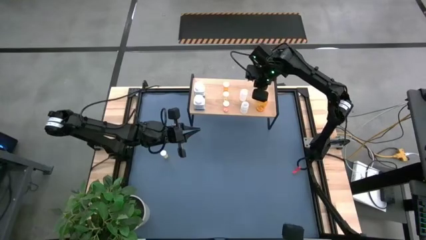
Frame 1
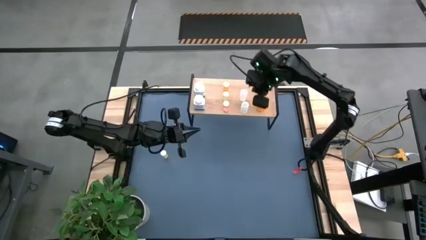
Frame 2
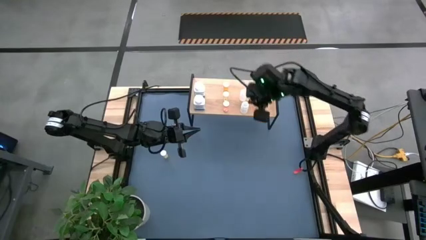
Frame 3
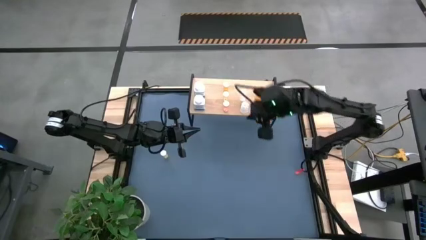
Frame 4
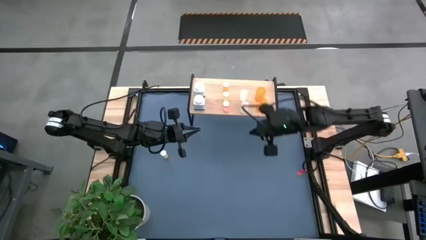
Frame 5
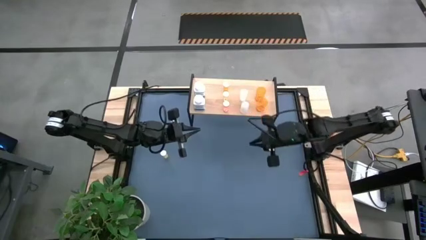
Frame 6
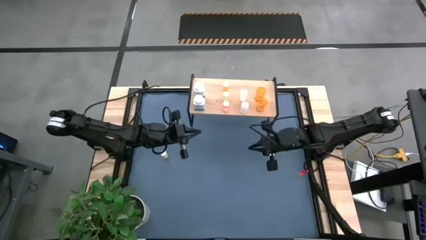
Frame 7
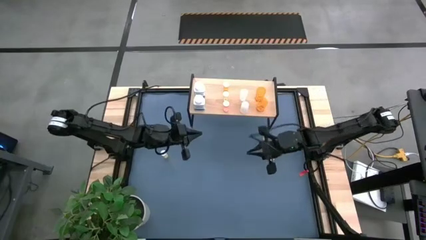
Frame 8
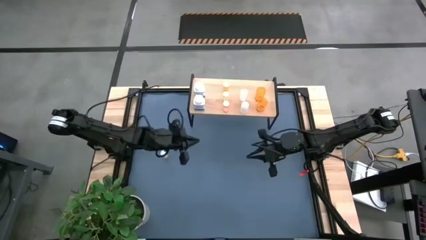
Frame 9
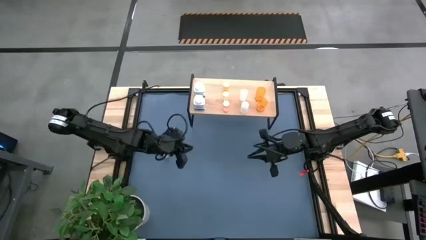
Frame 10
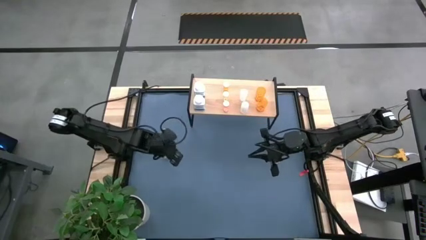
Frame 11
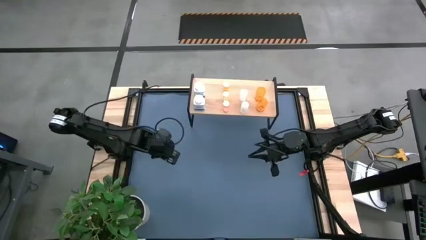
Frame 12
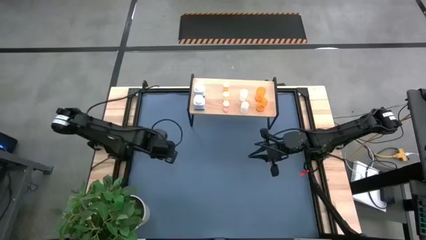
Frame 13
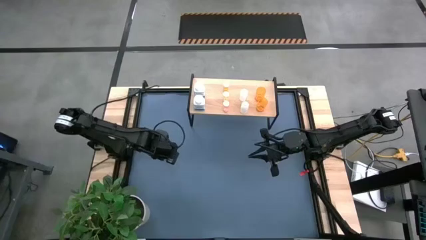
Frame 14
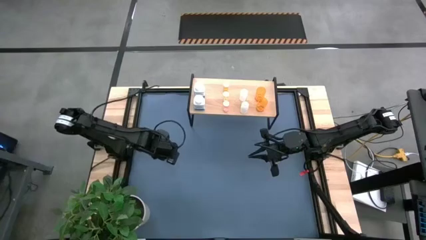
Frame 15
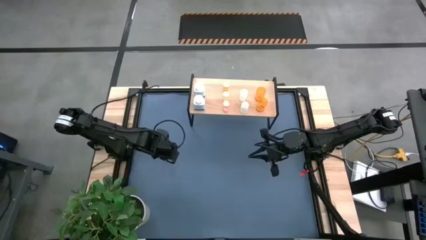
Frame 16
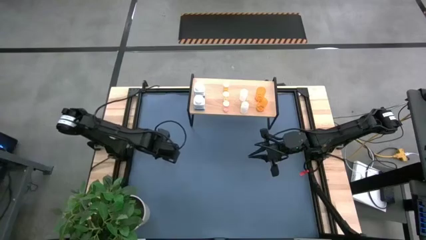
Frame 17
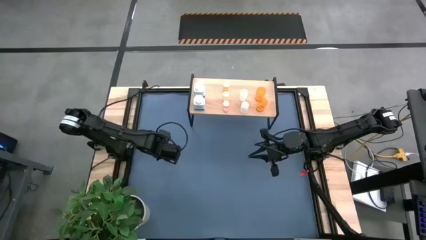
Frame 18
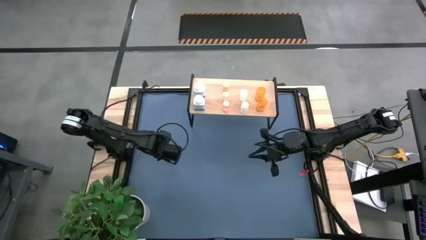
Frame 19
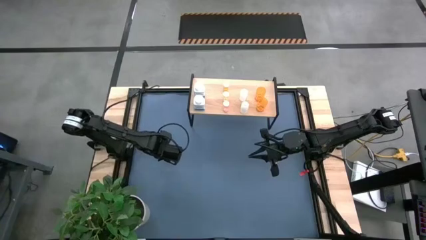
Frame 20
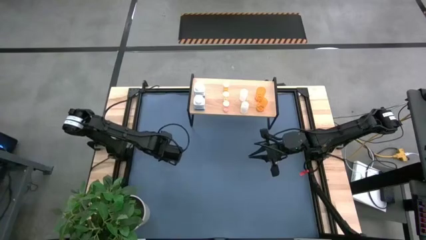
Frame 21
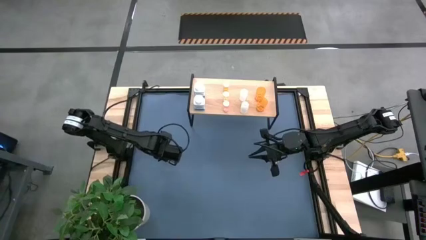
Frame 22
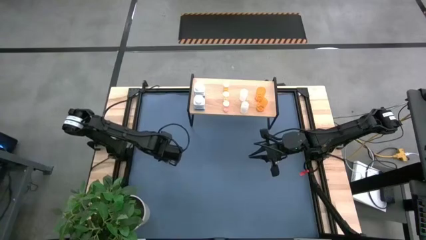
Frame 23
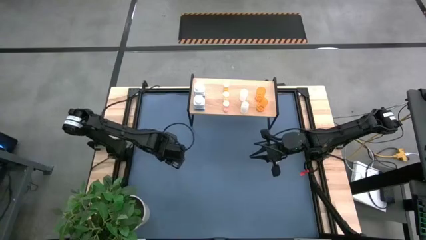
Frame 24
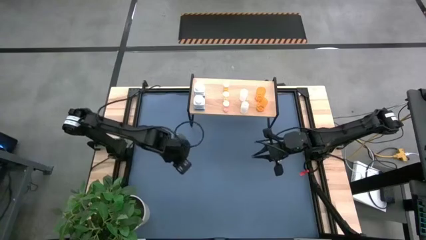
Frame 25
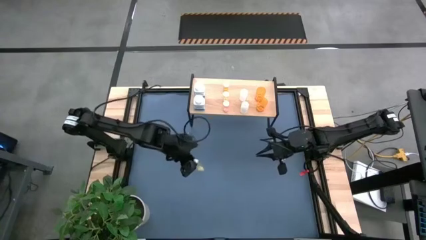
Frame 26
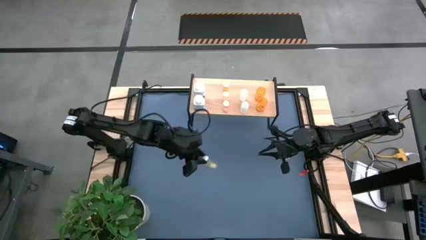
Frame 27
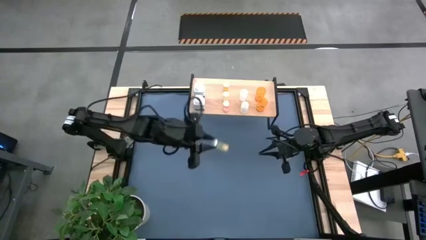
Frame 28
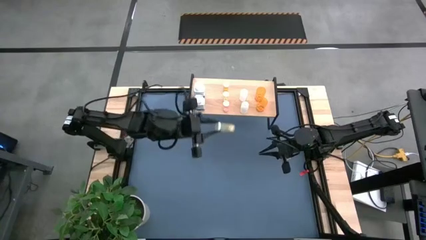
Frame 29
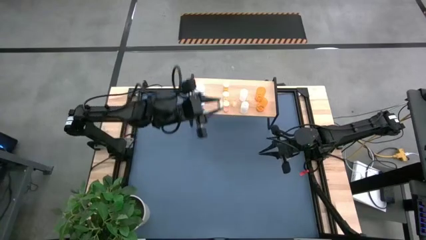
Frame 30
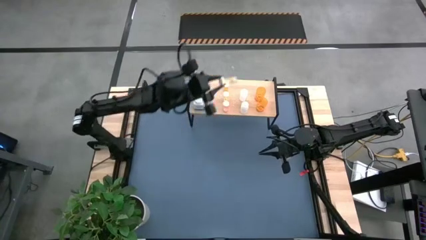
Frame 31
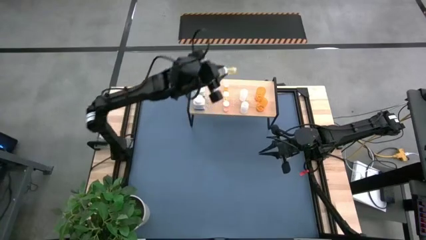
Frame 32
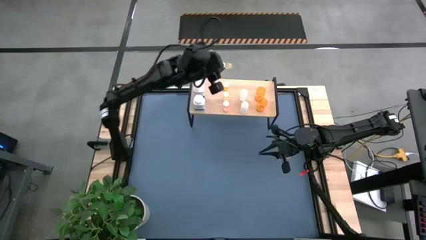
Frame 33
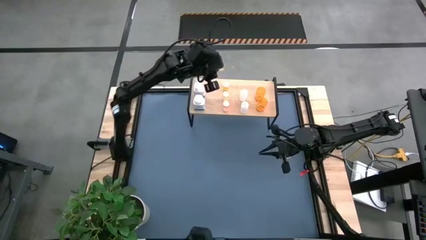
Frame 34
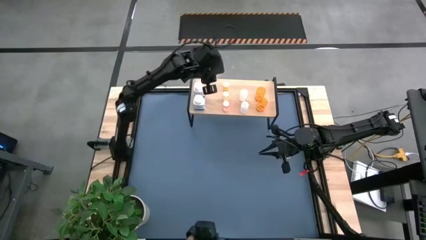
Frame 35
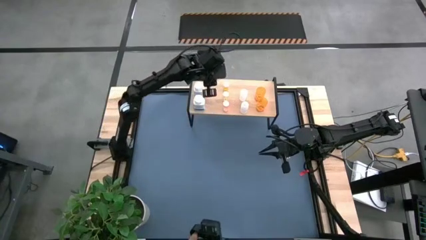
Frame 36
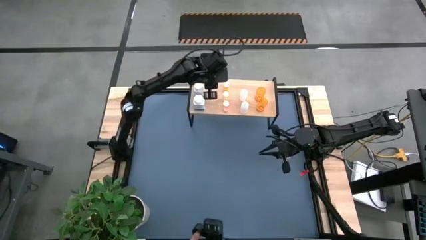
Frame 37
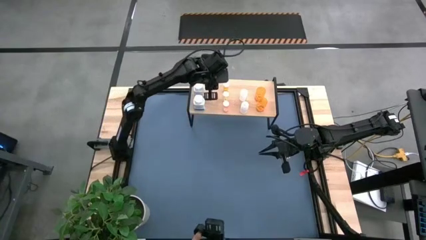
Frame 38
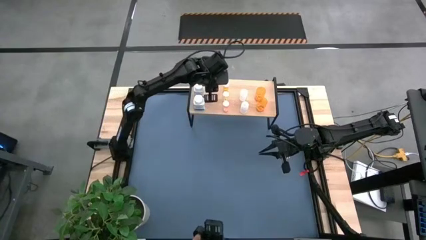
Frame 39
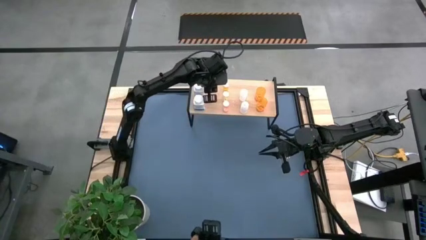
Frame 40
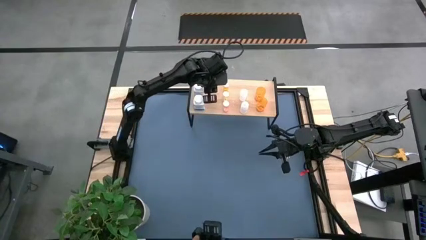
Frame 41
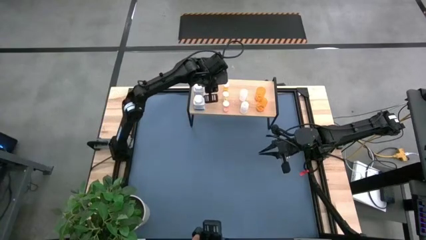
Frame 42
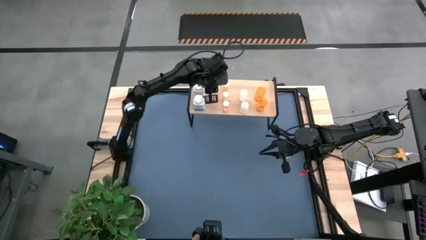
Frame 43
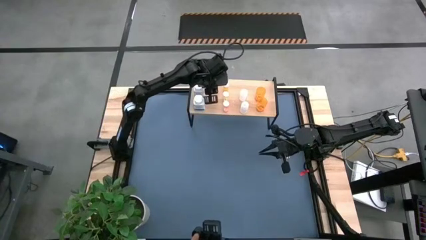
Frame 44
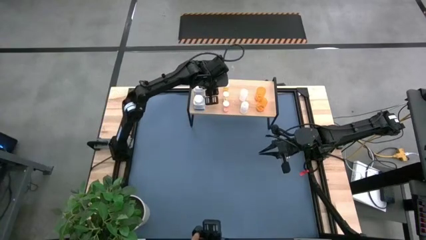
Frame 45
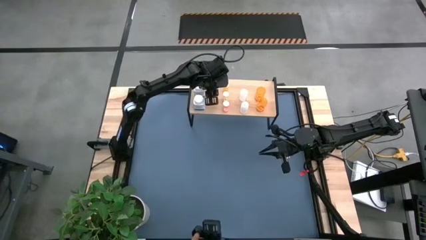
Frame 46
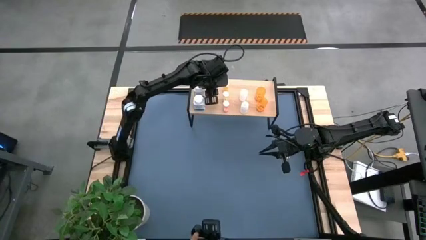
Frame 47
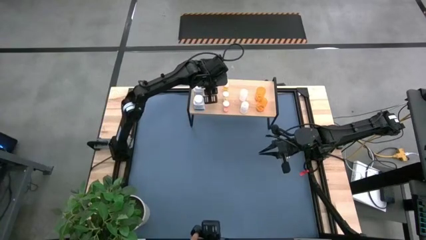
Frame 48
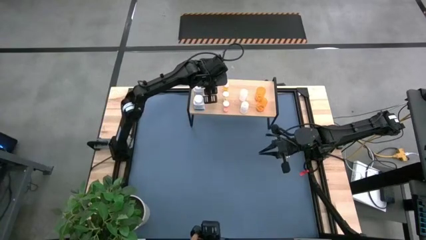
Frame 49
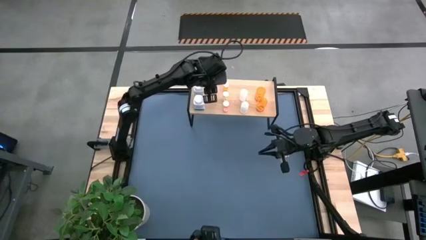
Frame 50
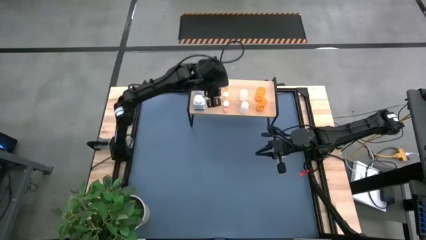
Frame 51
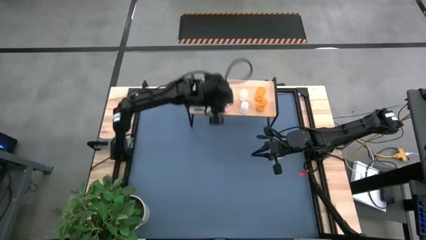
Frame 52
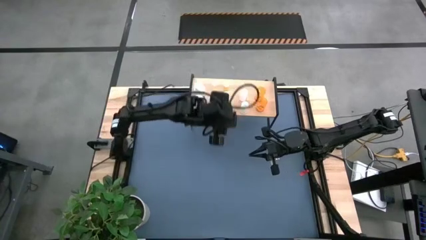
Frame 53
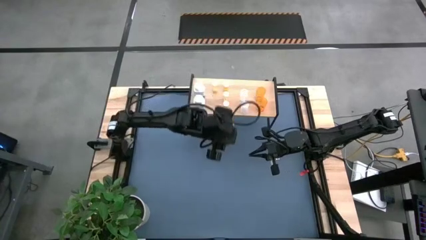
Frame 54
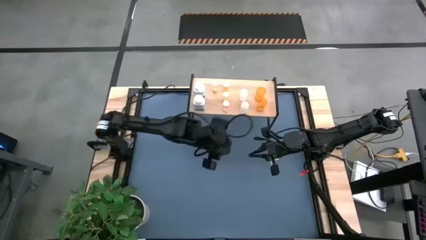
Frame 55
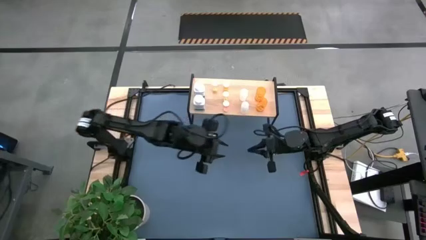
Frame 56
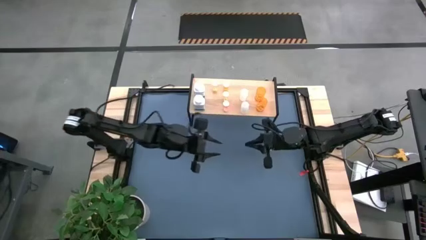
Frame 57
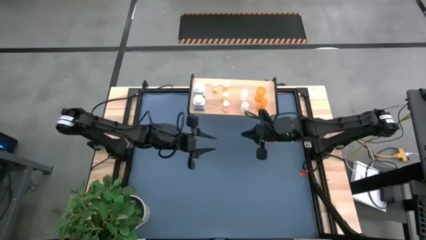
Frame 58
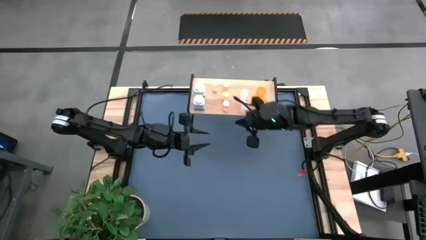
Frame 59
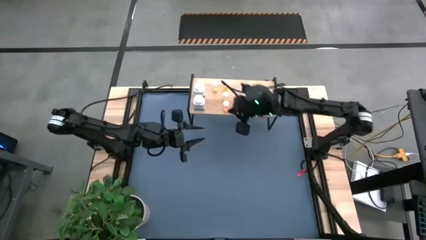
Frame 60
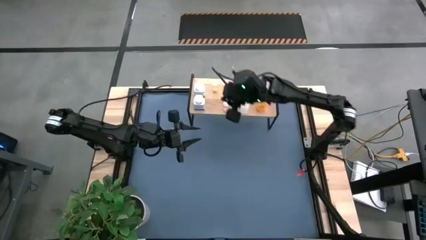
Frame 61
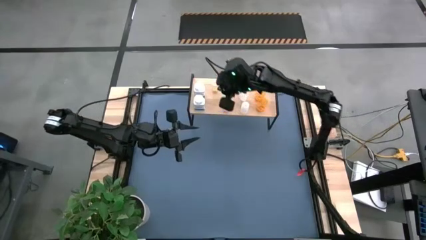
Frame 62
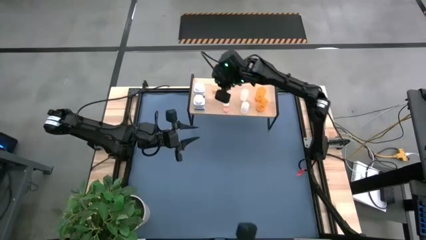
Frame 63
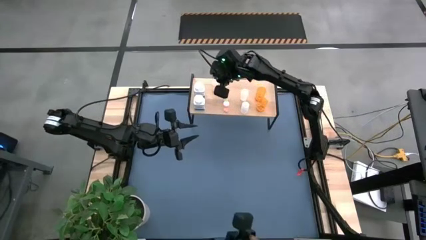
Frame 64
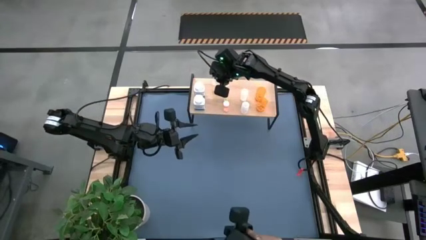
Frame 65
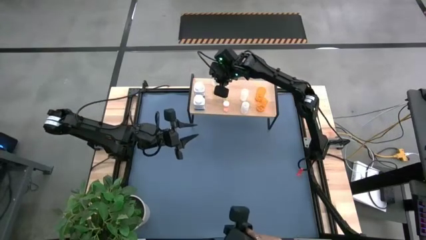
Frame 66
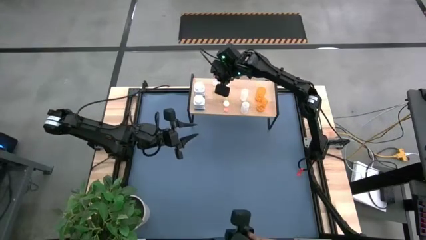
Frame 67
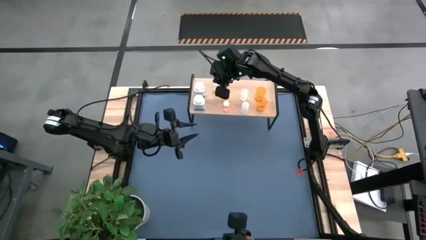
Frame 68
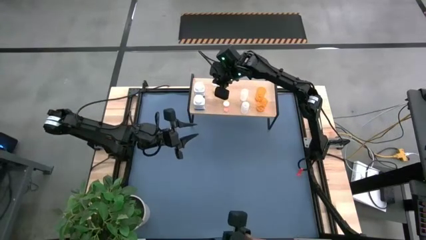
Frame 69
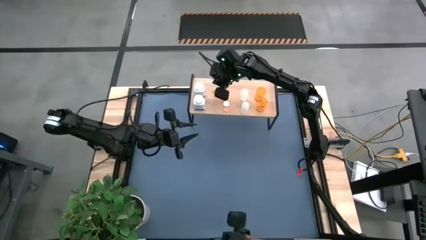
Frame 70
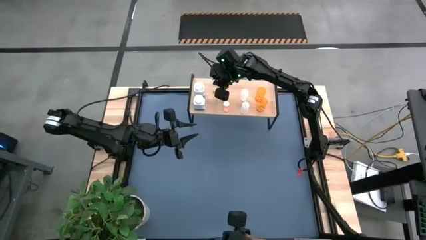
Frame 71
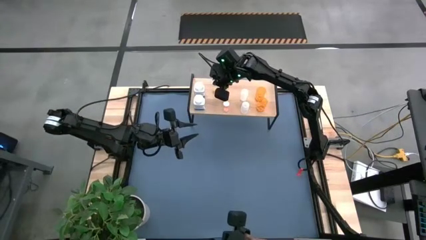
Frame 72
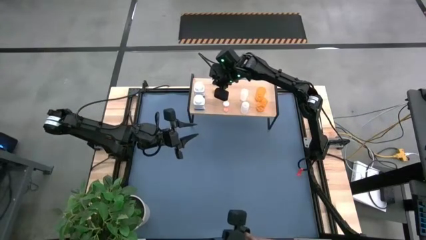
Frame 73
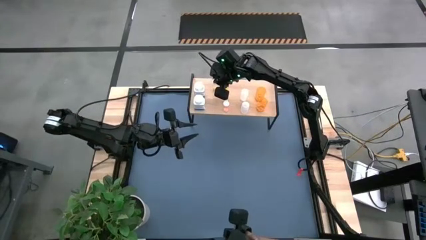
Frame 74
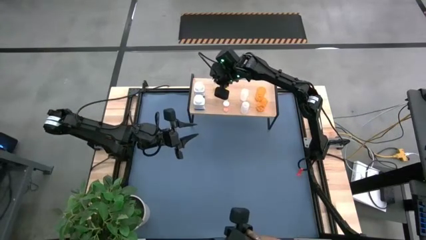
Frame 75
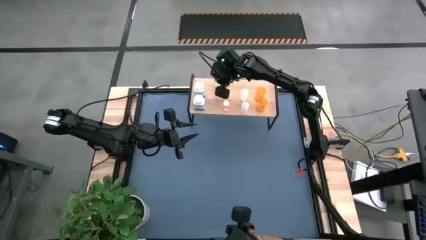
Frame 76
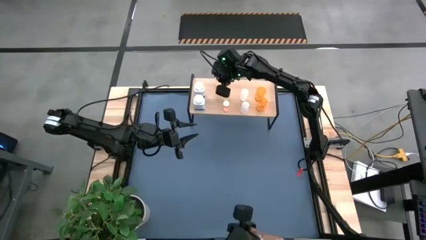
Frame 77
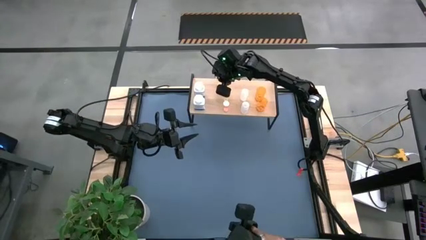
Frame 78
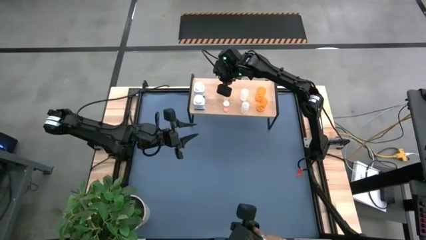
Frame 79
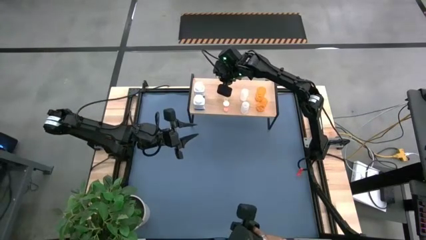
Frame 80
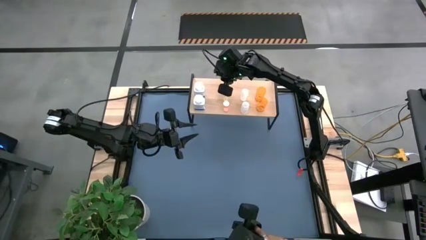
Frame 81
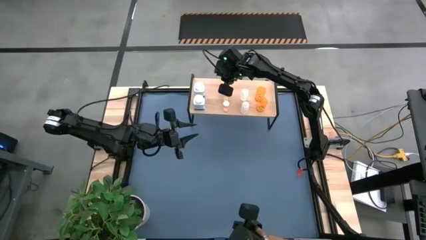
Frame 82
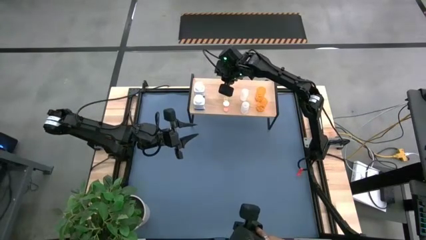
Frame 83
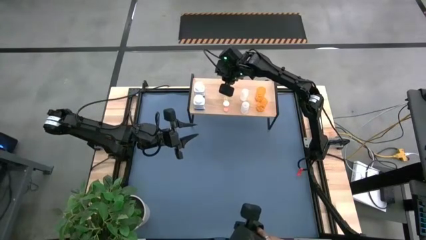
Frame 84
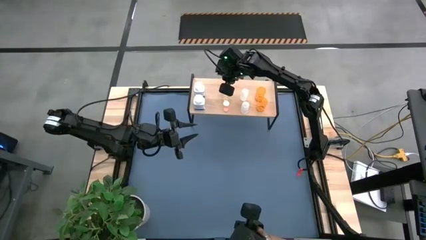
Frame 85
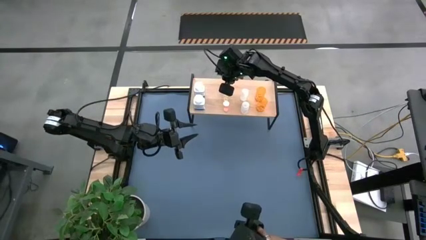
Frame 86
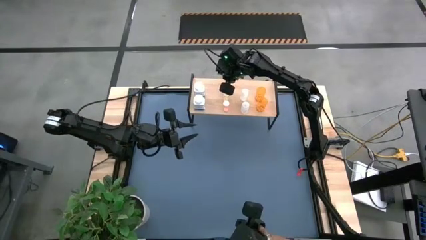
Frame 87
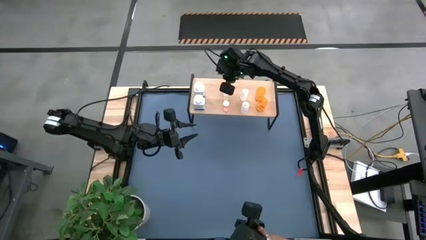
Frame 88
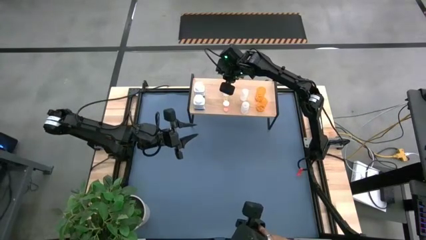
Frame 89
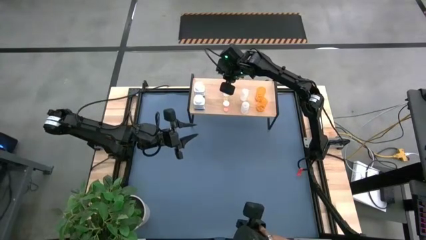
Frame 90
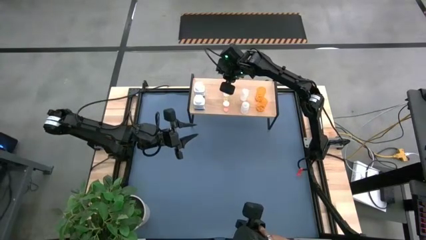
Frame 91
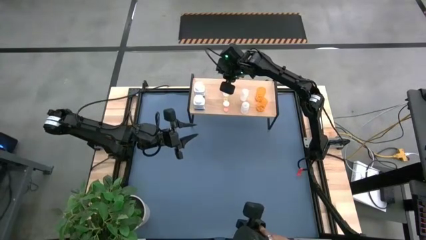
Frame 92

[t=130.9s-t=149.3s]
Task: Pick and place medicine bottles onto shelf by color
Put the yellow pill bottle on the shelf
